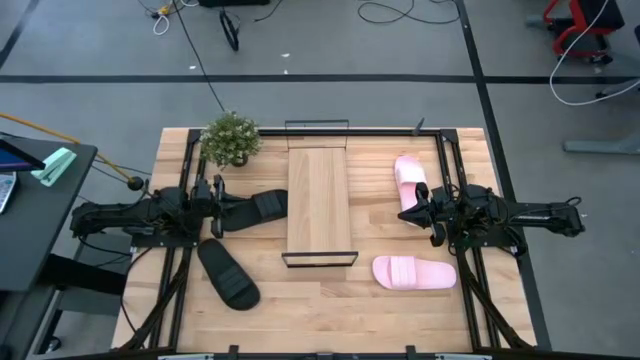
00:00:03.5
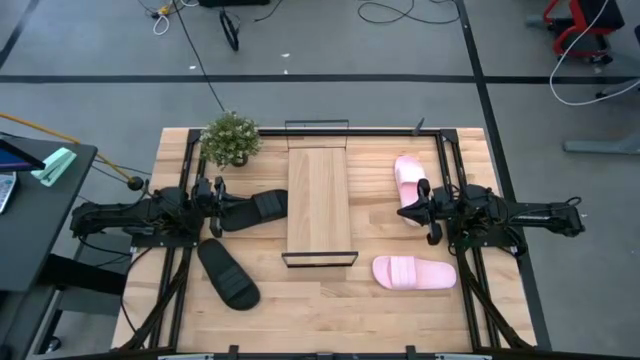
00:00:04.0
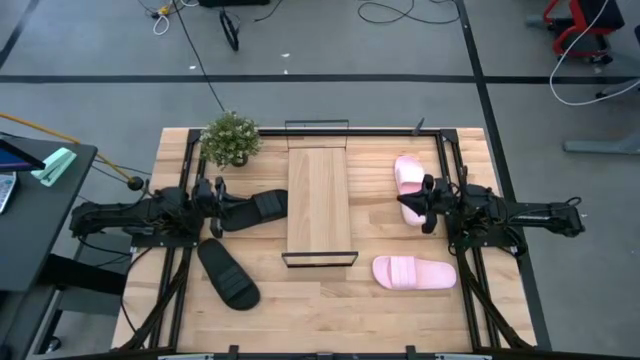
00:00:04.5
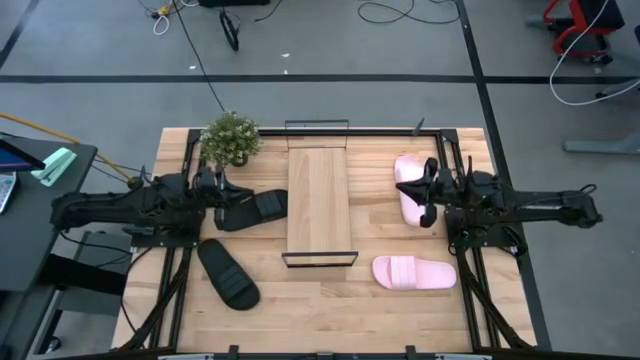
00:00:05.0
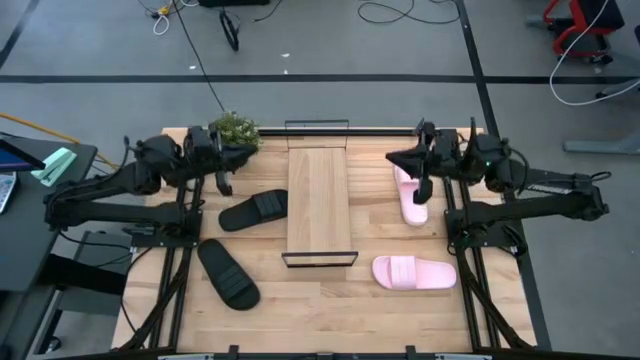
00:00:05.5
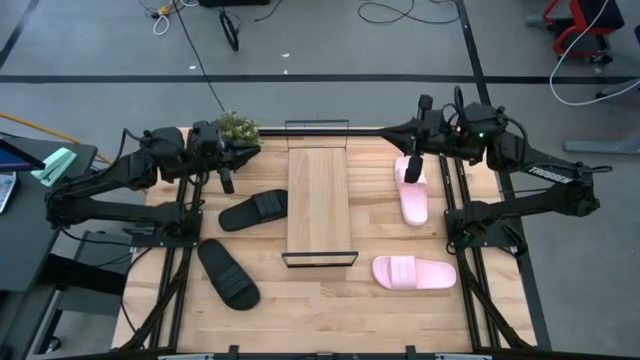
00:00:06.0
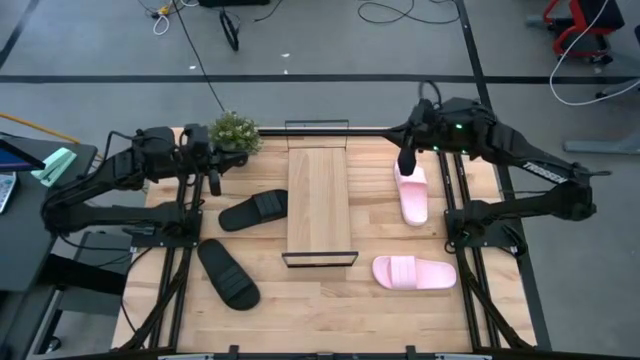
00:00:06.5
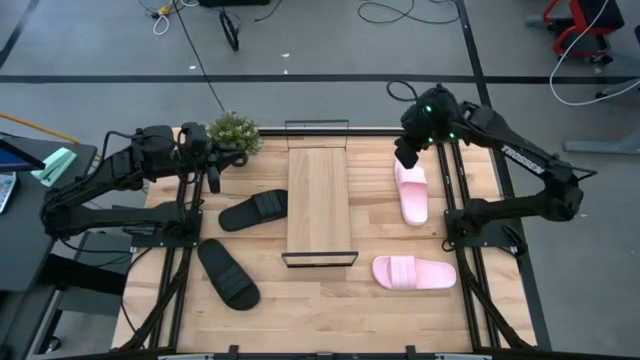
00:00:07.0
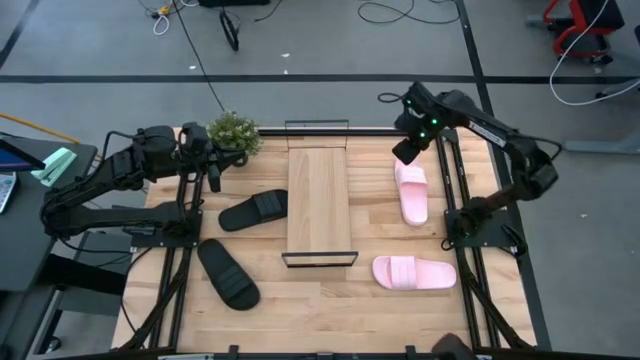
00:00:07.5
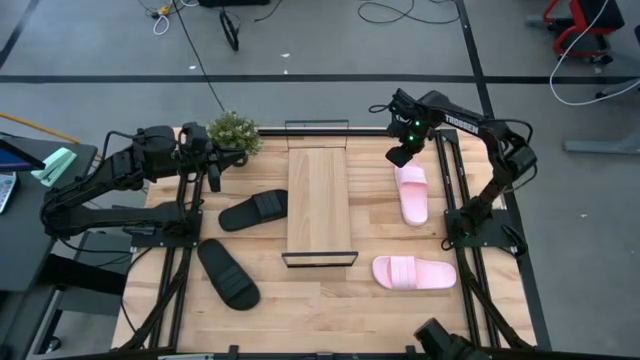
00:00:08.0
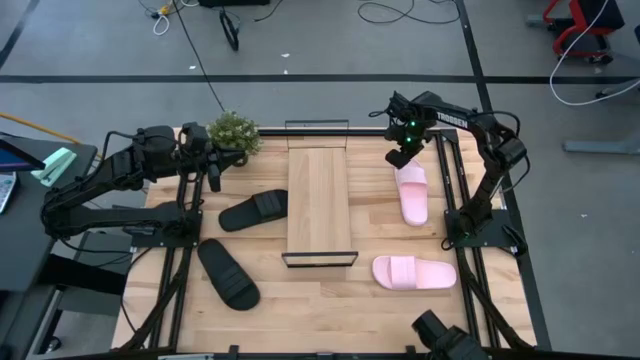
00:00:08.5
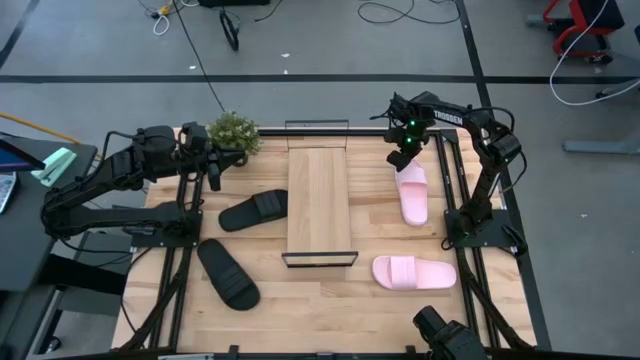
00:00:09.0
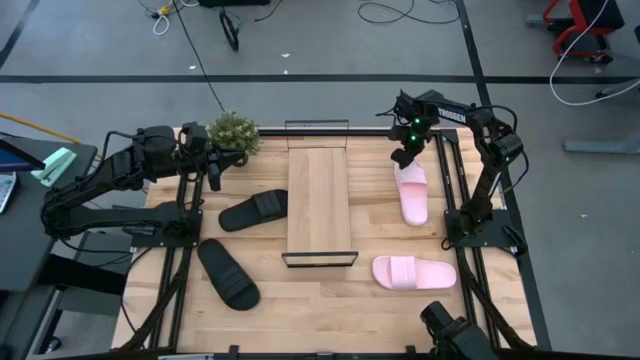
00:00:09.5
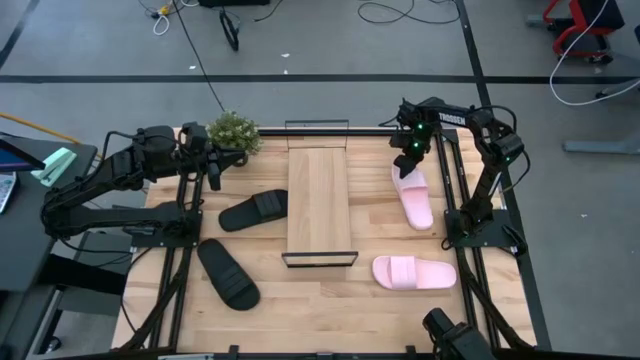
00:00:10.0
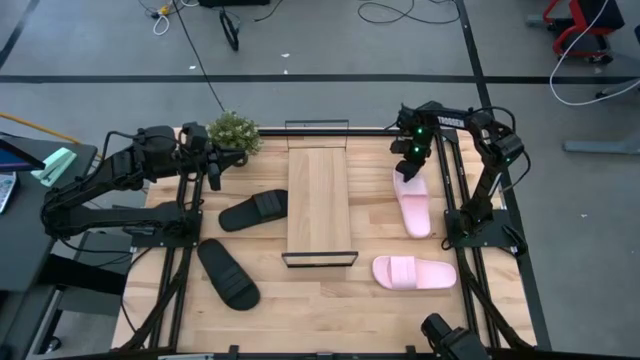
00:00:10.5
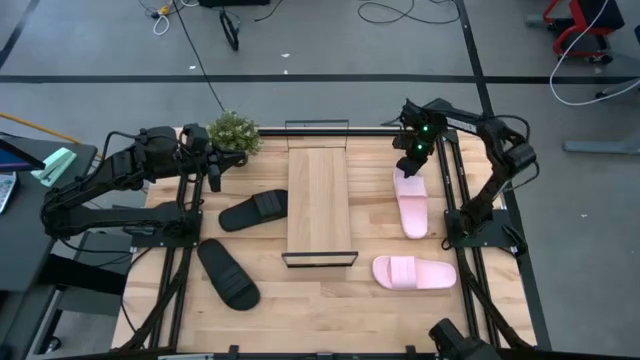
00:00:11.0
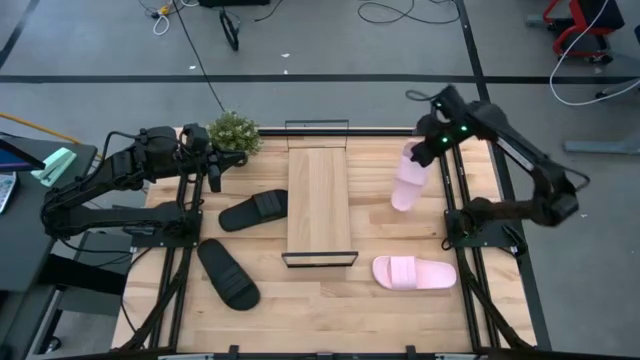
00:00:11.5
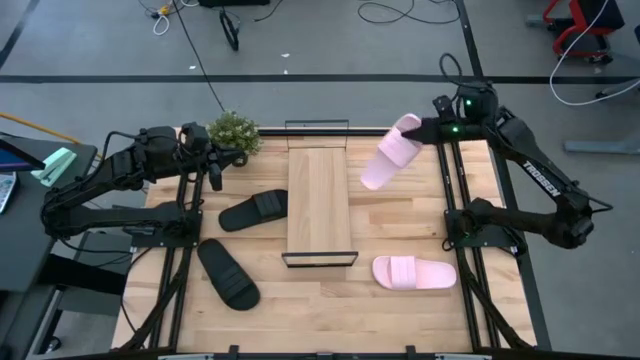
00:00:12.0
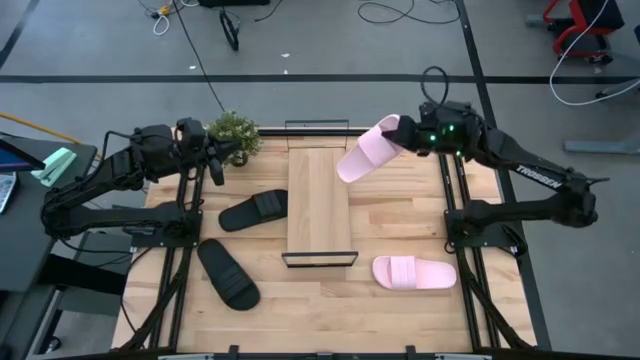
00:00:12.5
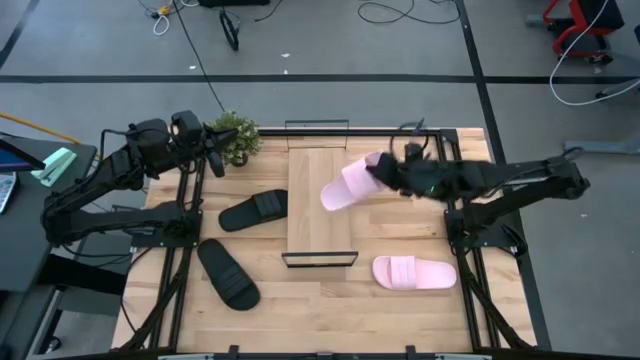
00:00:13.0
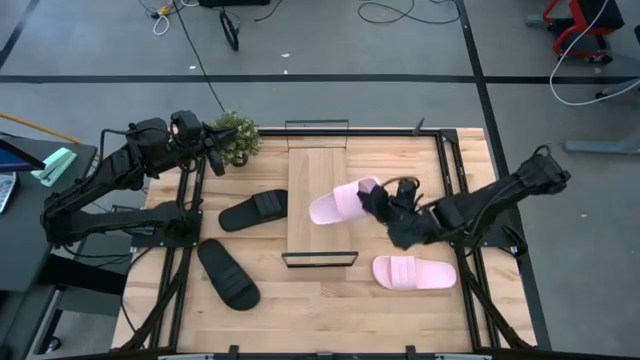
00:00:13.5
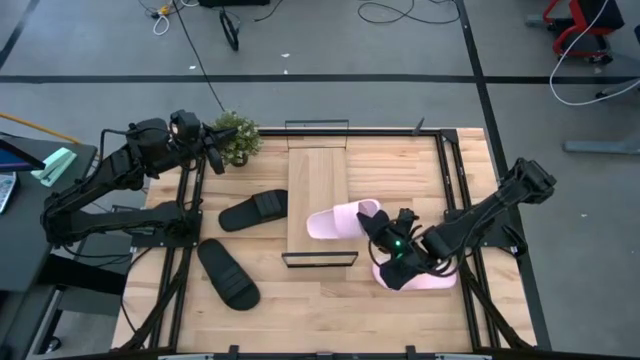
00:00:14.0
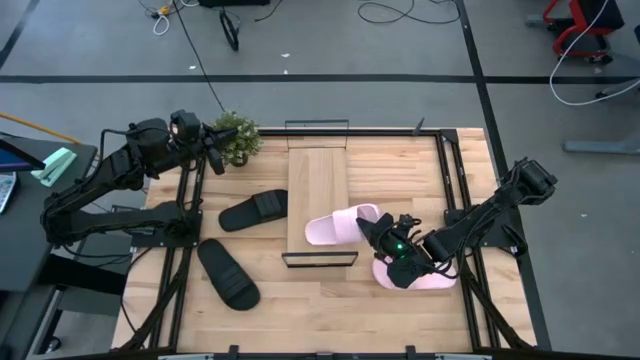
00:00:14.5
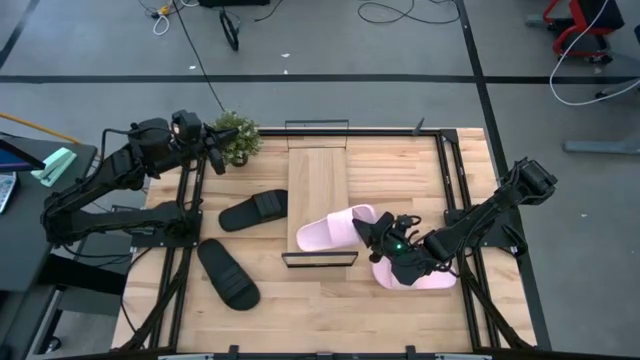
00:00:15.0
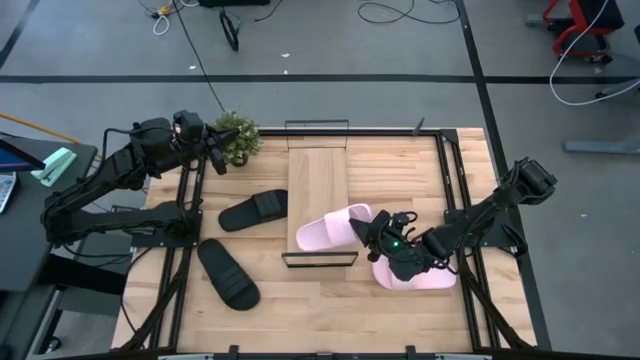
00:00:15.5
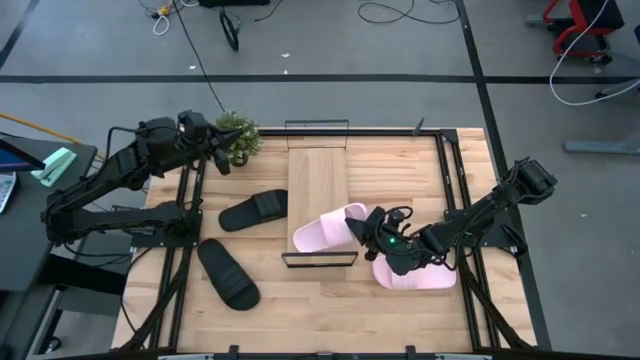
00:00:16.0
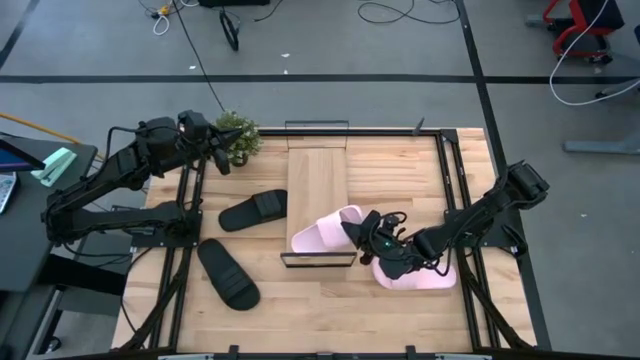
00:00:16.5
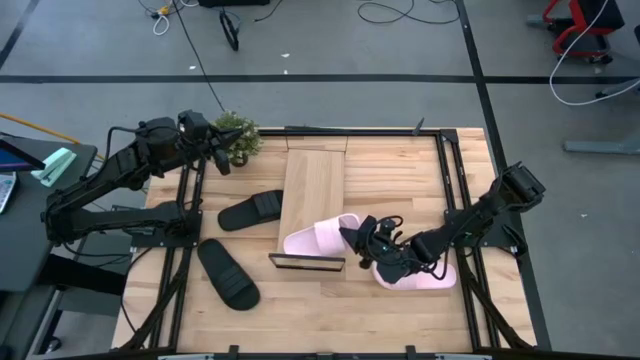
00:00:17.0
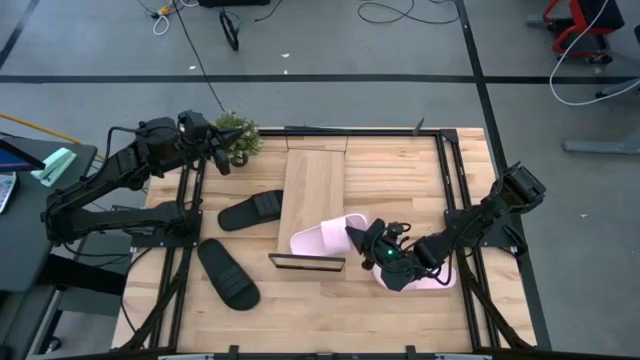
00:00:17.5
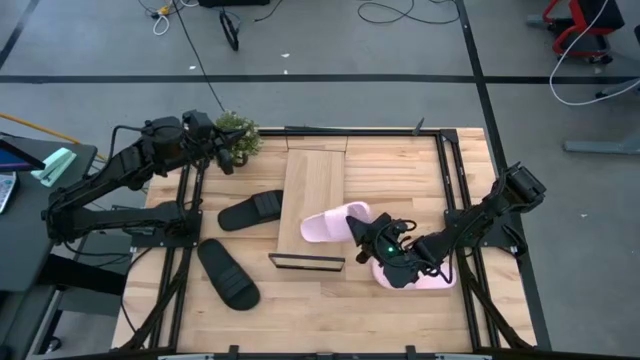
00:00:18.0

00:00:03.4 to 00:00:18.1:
Task: Pick and place slides into the shelf
Put the top pink slide on the shelf

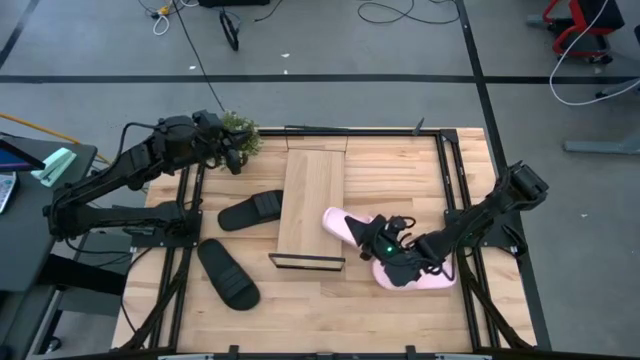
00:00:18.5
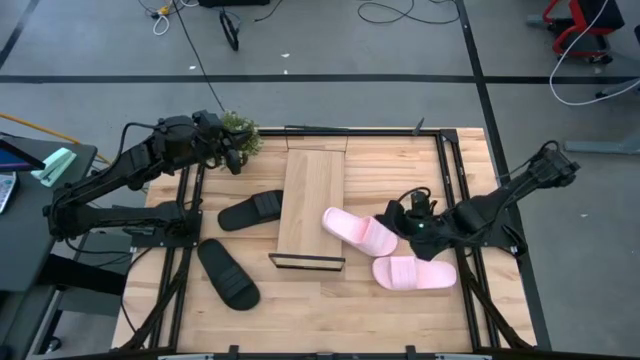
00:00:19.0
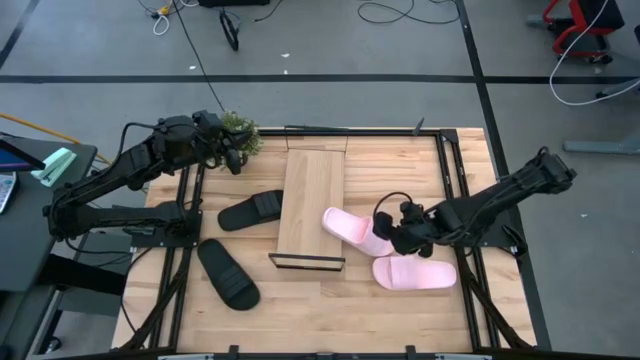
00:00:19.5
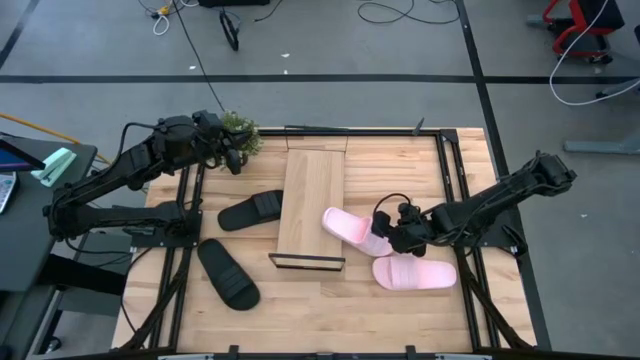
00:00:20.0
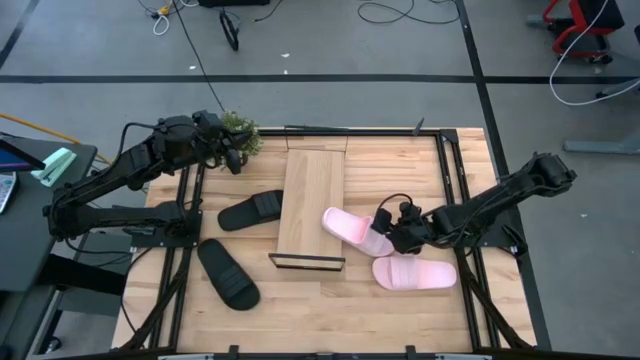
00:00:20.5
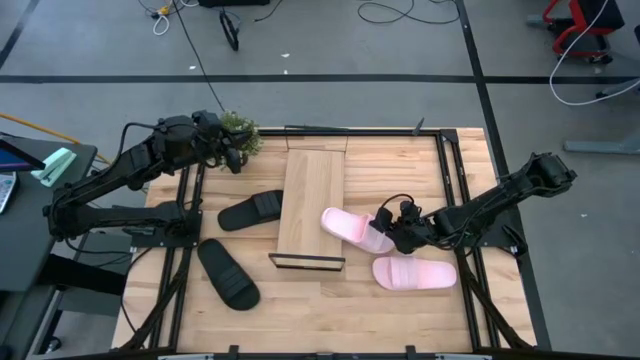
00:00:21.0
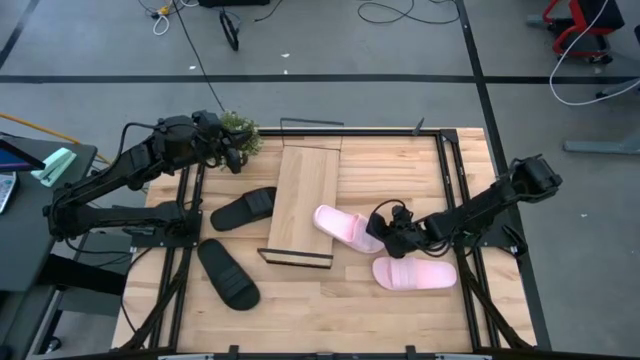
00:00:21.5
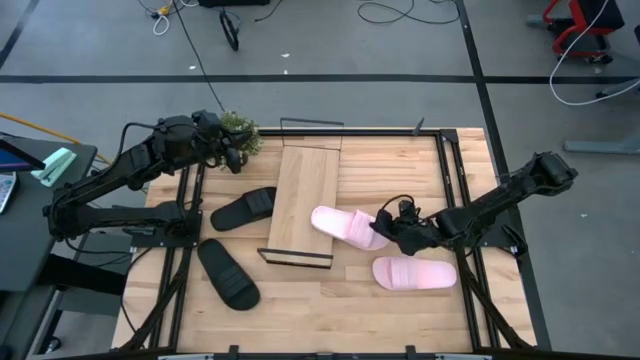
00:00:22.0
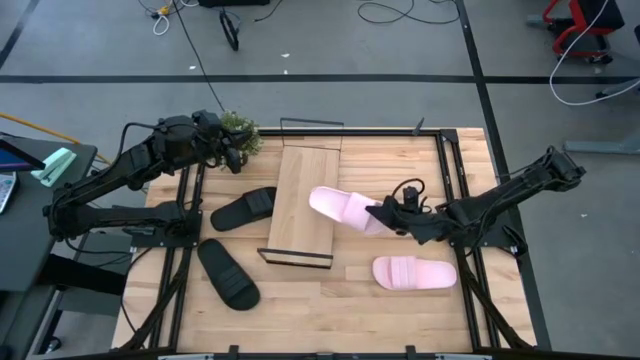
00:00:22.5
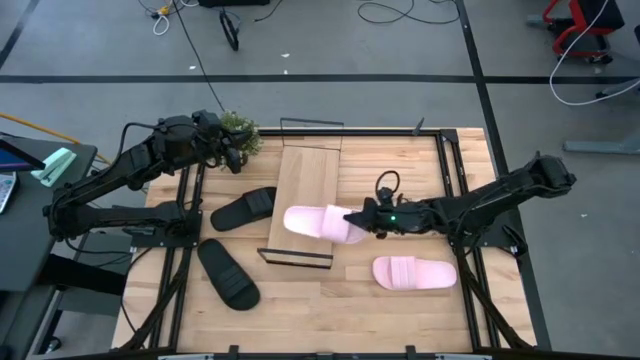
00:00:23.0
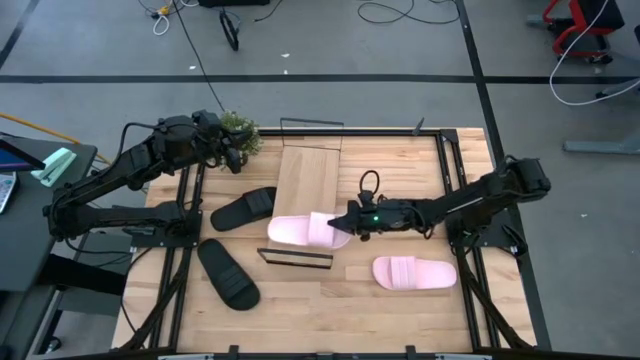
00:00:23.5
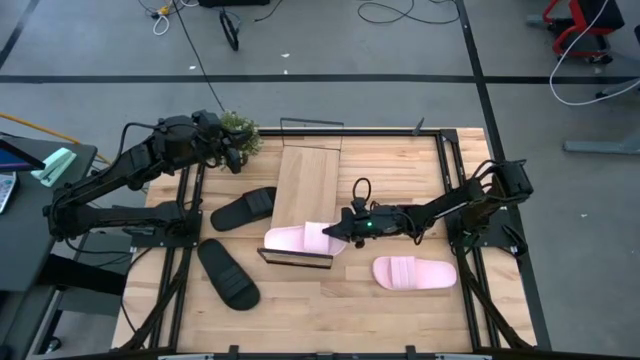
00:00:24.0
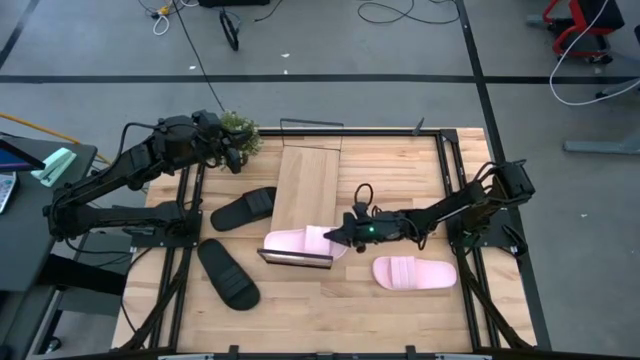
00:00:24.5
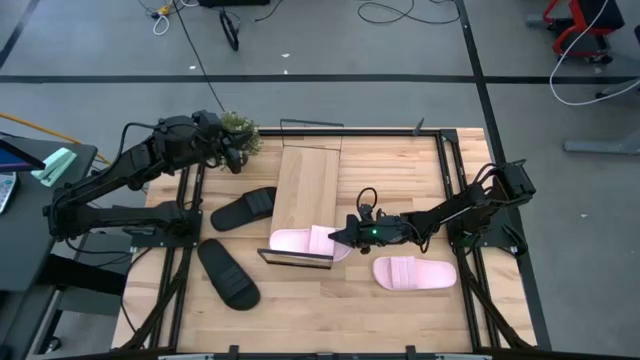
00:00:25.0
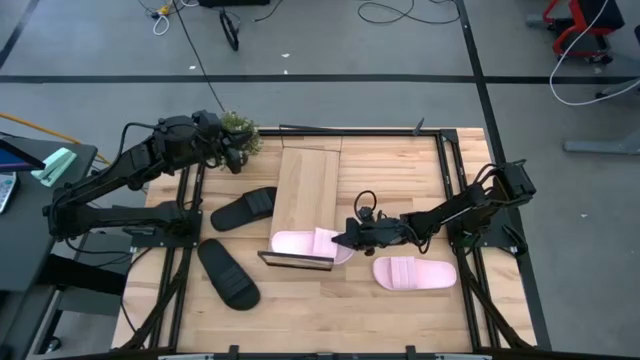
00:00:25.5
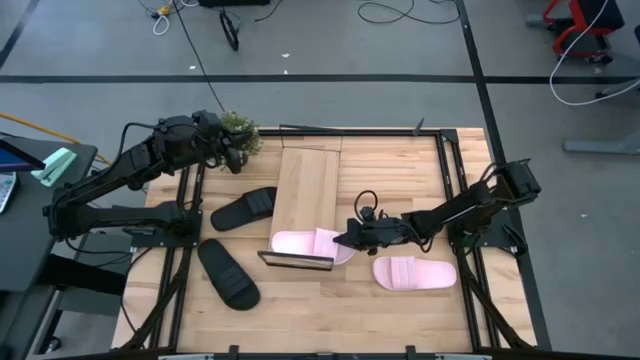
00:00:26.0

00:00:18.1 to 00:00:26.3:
Put the top pink slide on the shelf
